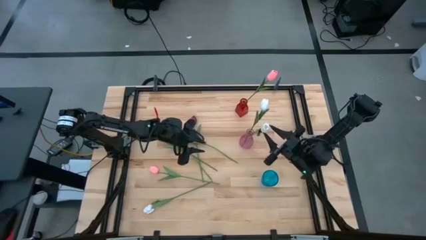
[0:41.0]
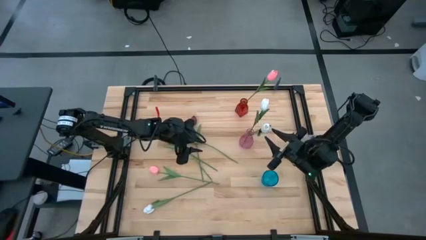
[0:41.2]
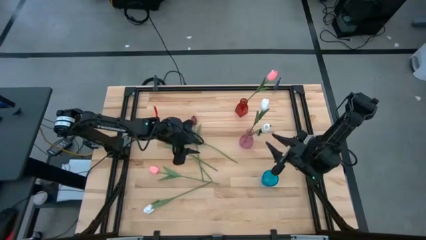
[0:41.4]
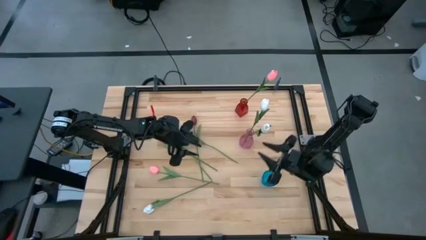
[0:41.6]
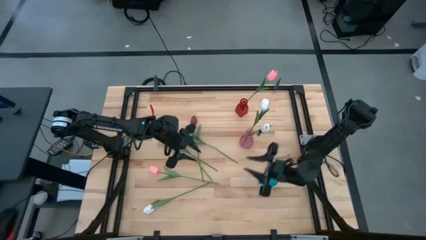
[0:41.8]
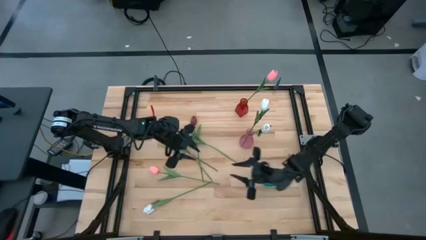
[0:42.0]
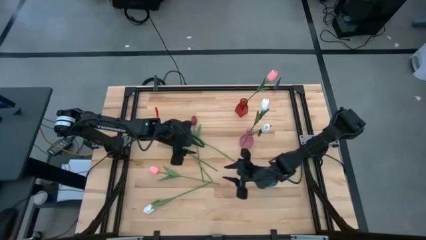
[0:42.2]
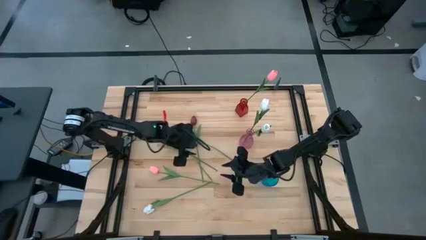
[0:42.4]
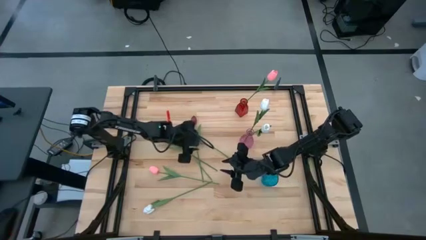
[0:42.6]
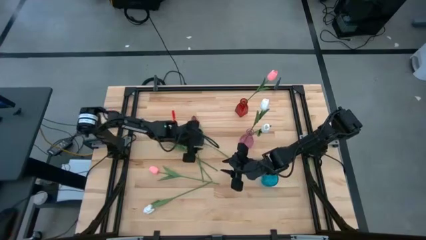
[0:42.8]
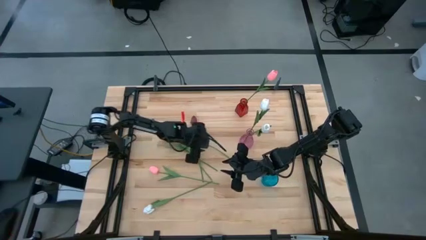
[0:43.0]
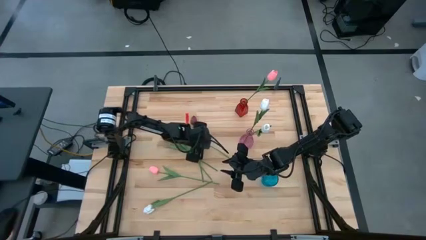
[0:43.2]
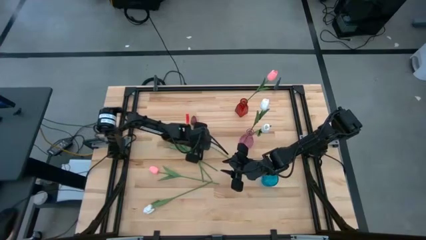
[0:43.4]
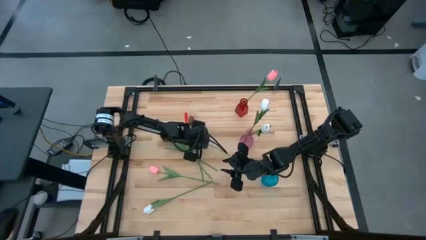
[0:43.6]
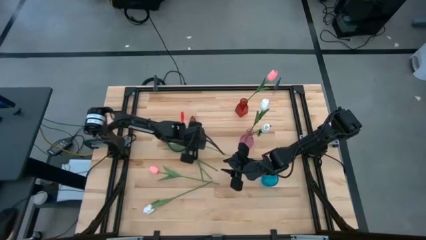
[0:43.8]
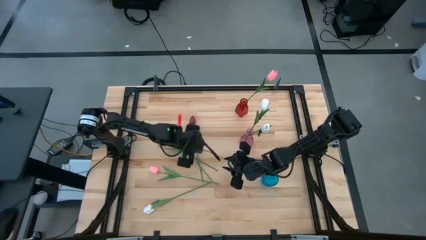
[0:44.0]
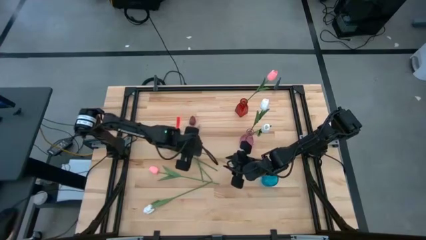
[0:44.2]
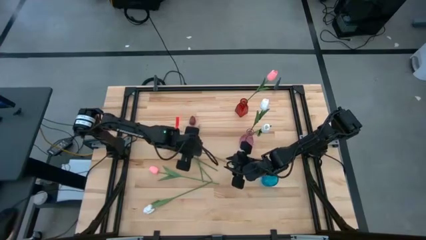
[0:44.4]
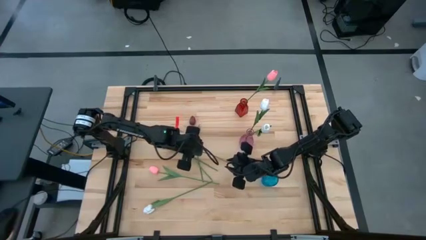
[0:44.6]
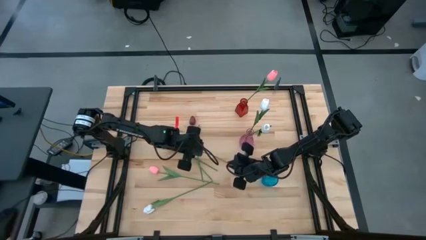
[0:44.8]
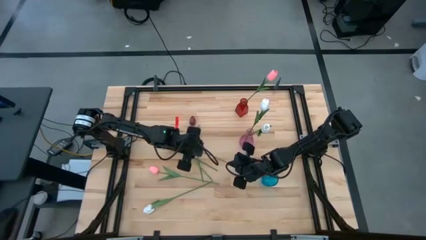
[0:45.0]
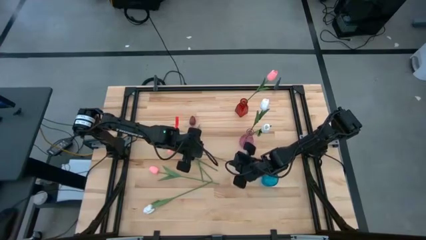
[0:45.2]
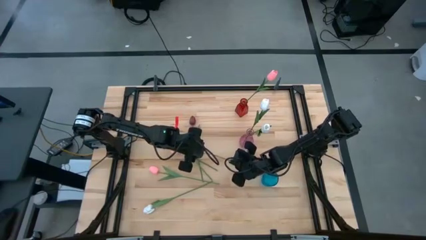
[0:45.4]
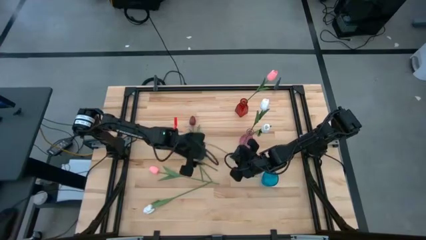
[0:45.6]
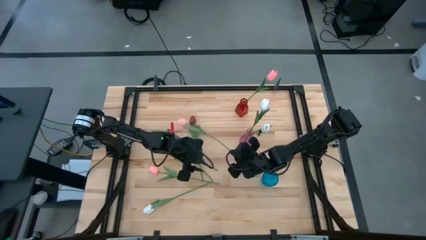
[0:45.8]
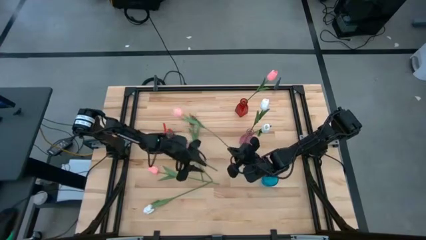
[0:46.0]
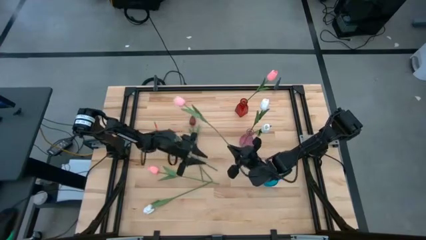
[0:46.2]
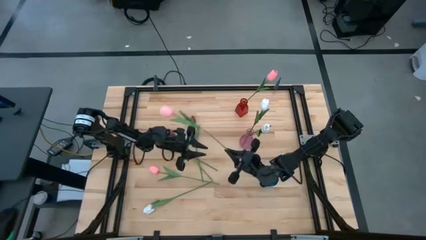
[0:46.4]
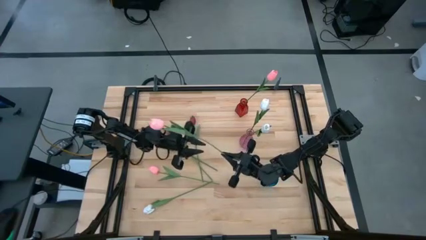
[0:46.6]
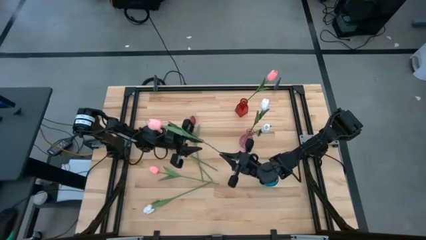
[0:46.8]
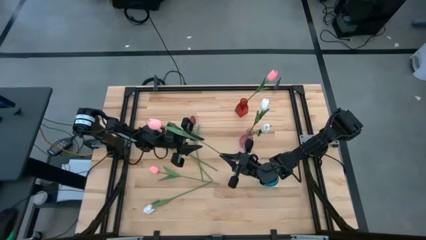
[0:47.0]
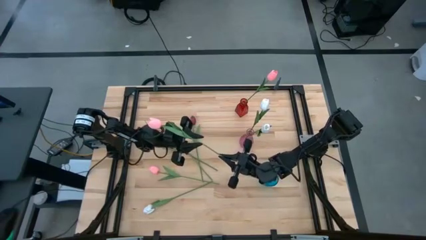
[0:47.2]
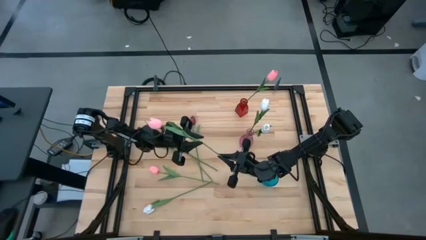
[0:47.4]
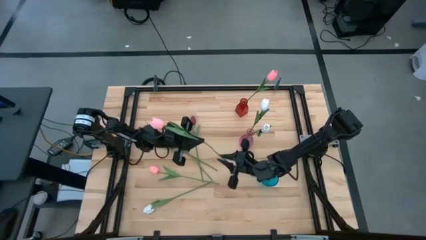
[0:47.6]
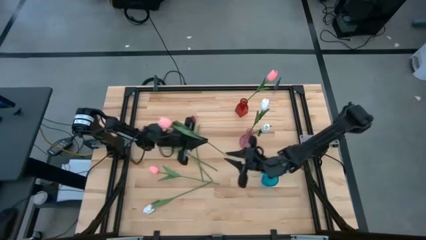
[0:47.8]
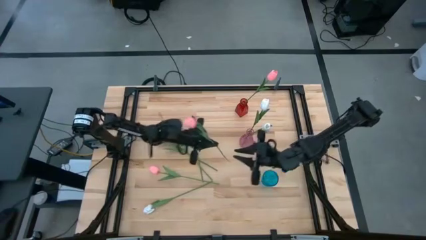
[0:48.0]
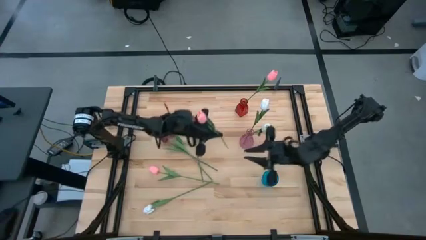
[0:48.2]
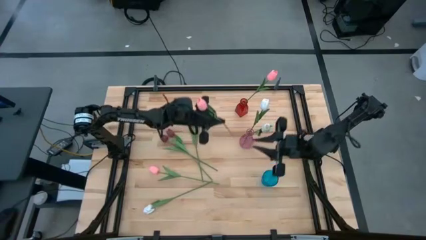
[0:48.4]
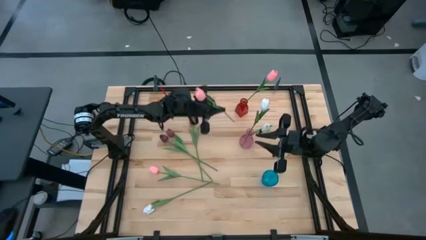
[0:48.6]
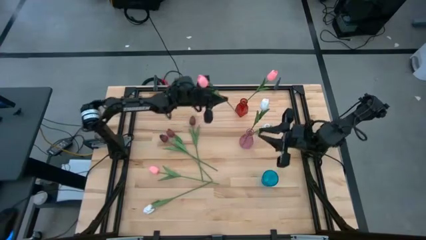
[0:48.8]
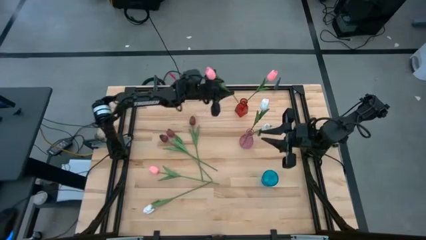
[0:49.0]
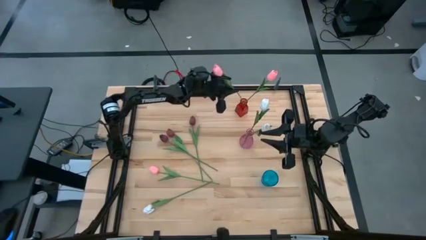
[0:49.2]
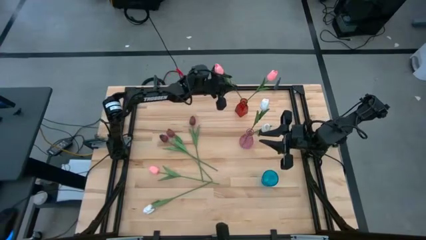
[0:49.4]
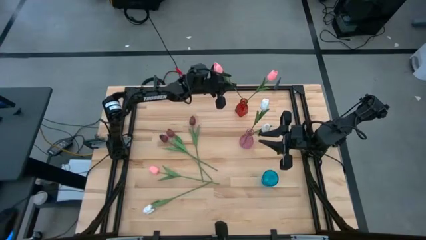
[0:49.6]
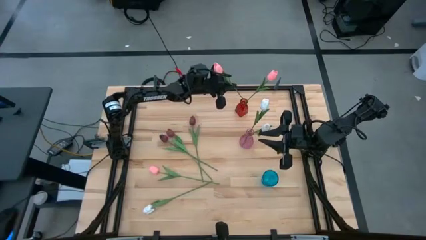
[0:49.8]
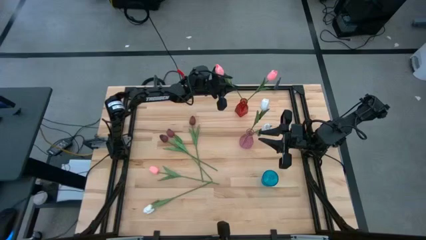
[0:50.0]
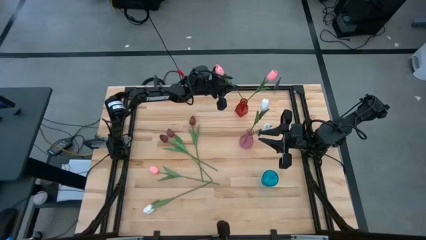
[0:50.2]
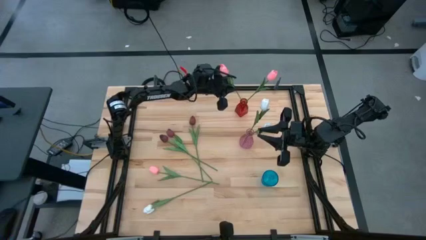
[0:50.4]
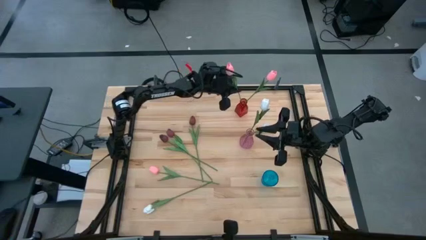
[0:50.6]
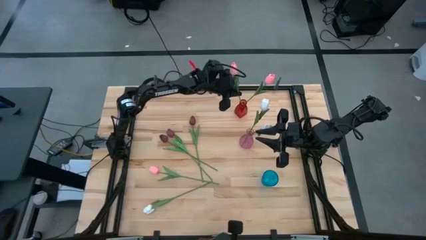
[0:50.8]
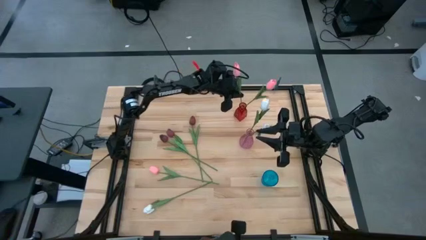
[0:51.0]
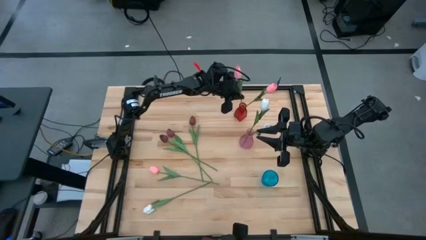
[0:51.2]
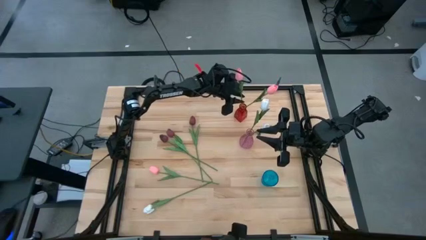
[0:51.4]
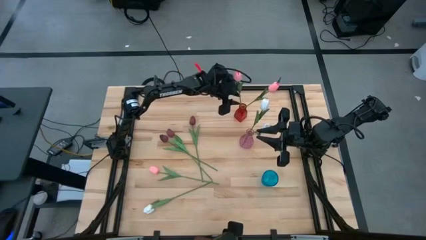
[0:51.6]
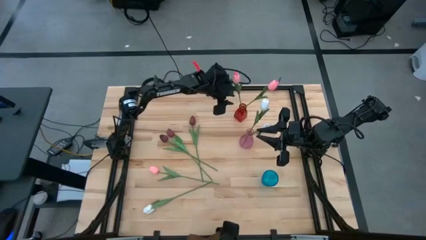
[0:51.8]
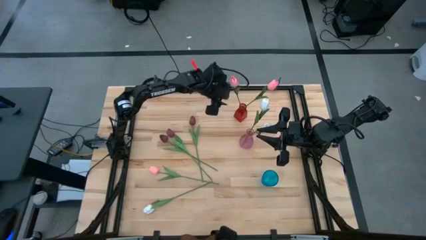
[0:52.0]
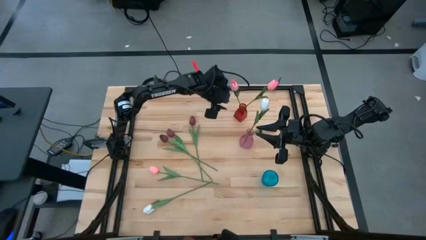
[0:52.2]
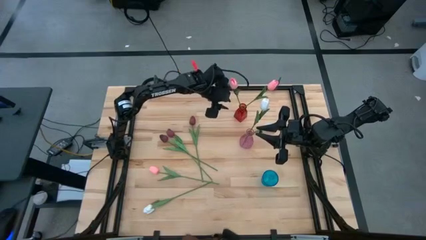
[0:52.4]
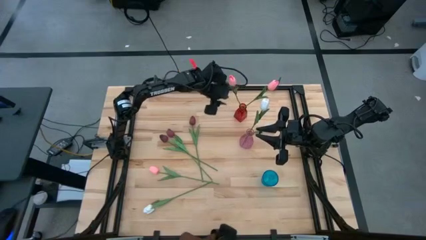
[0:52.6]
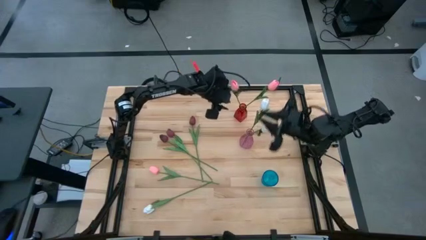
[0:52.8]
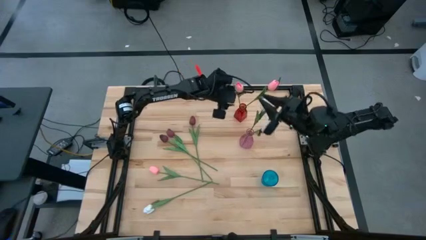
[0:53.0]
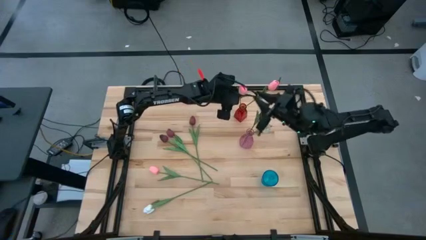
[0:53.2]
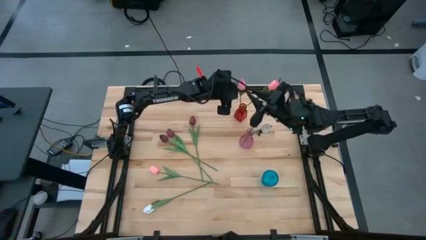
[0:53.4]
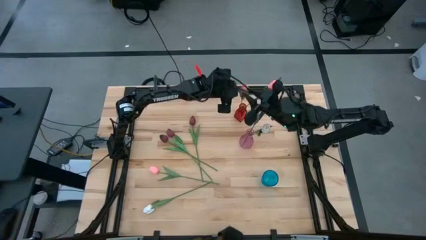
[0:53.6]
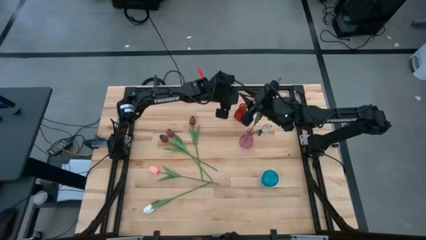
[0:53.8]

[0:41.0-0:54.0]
Task: Sort flowers into vase by color
Put the top pink tulip into the red vase

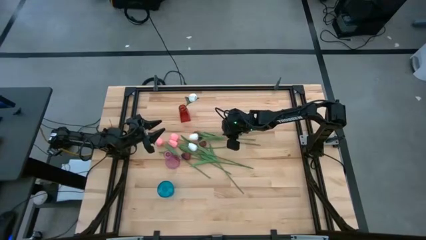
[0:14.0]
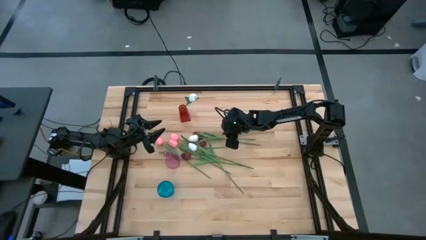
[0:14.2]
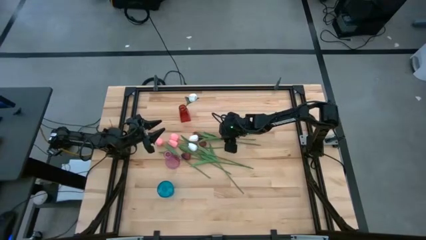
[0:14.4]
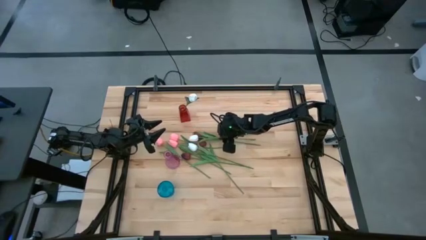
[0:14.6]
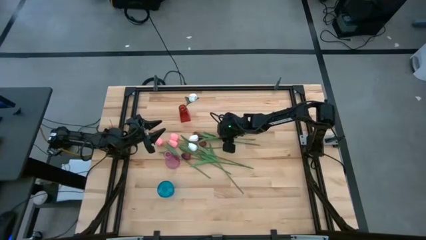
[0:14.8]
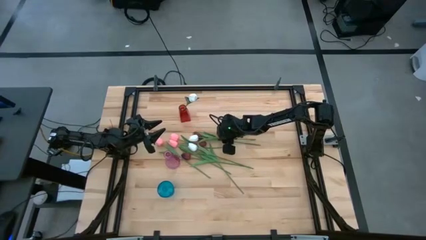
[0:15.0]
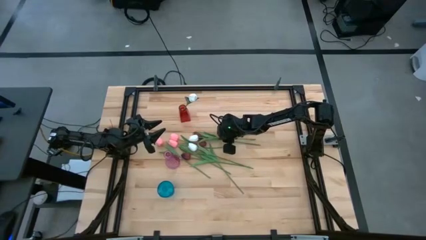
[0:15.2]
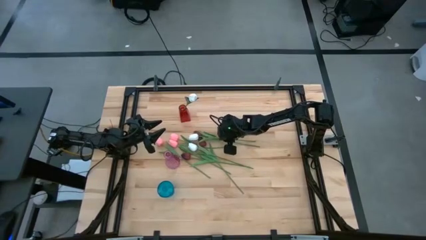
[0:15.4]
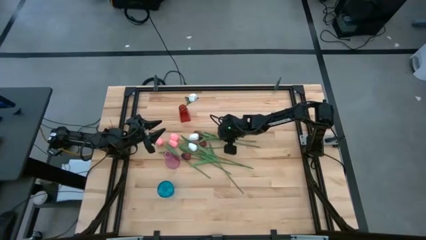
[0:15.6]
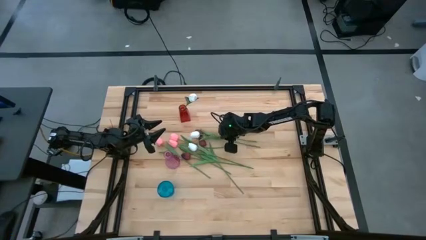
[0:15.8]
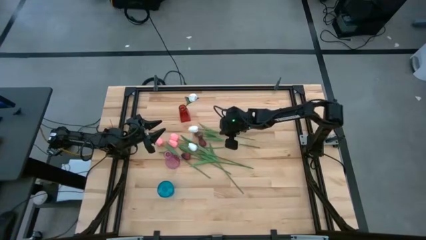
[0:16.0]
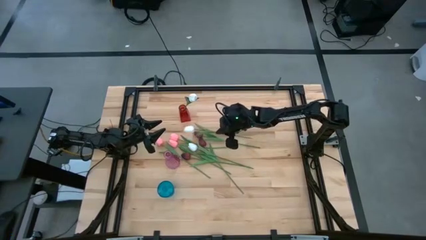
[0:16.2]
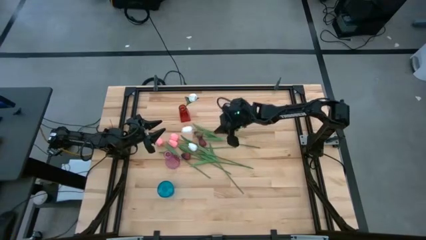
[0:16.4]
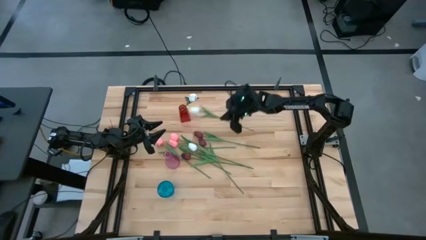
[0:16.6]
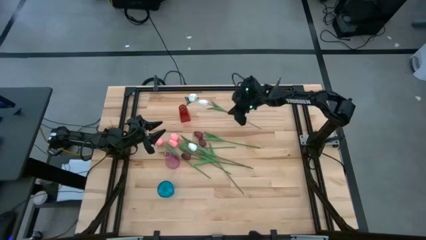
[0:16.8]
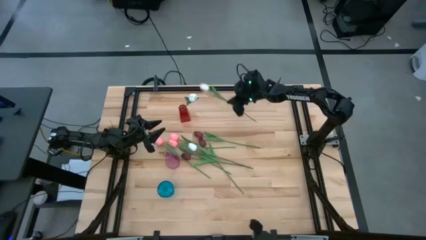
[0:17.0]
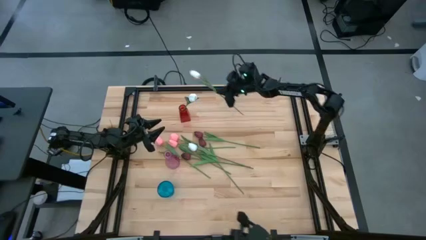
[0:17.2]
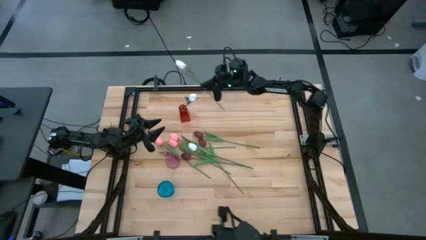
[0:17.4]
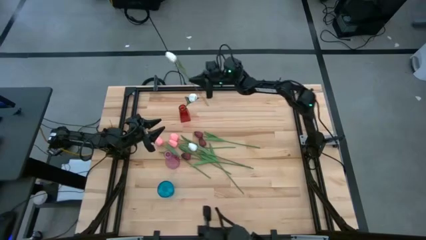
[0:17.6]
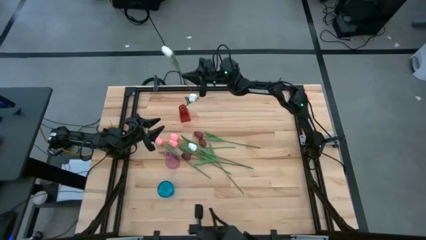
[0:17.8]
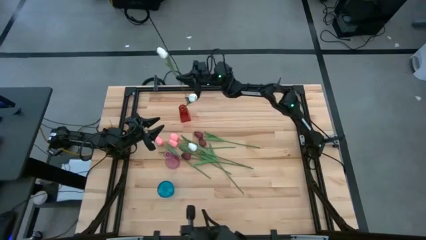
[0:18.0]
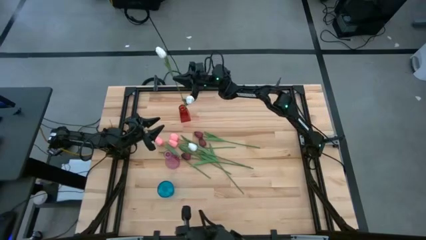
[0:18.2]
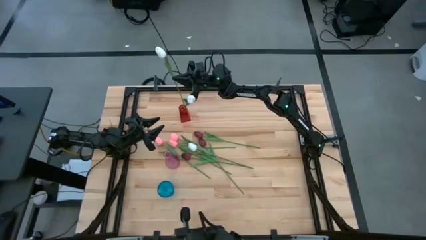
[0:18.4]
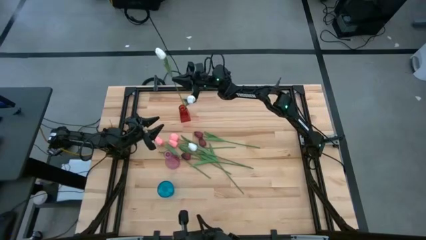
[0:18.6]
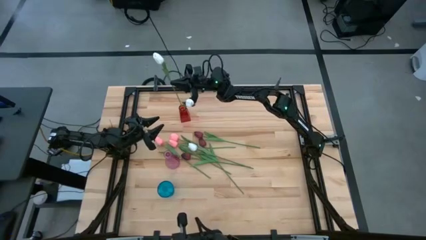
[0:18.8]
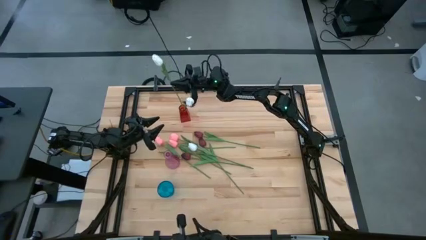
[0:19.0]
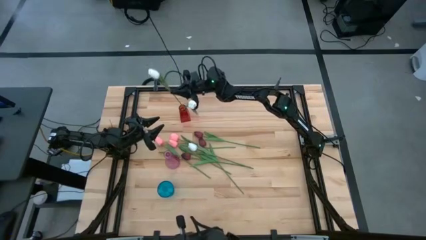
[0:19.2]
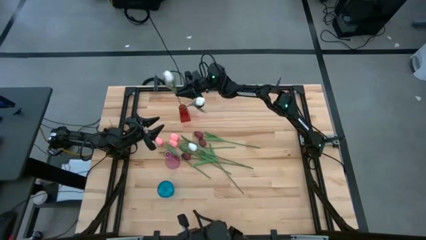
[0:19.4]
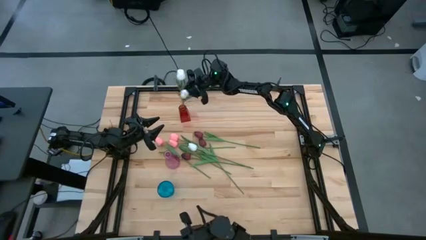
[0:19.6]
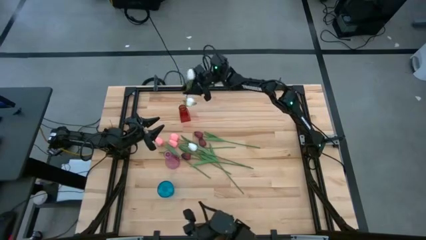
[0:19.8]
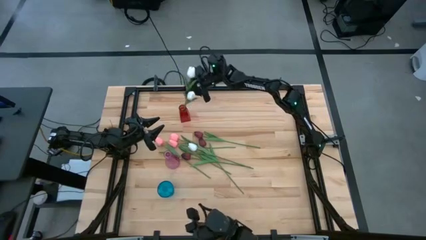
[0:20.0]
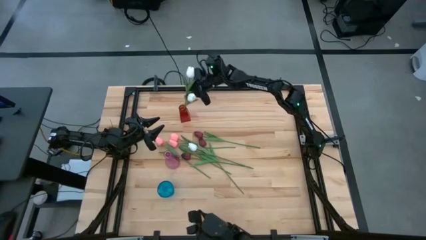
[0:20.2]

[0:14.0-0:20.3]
Task: Sort flowers into vase by color
Put the top white tulip into the red vase
